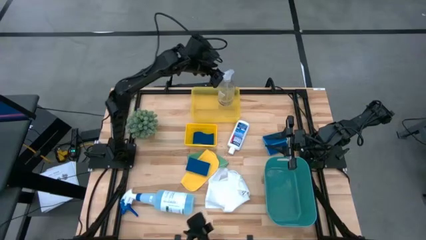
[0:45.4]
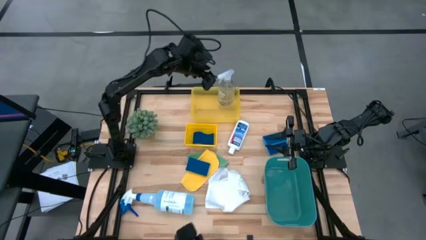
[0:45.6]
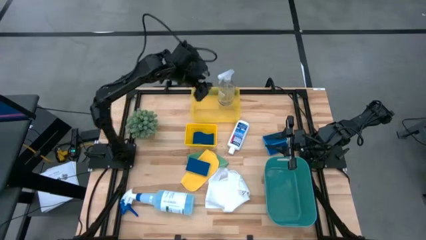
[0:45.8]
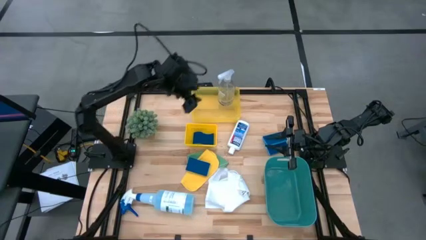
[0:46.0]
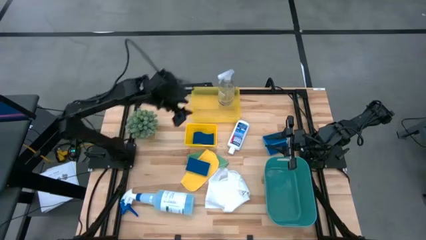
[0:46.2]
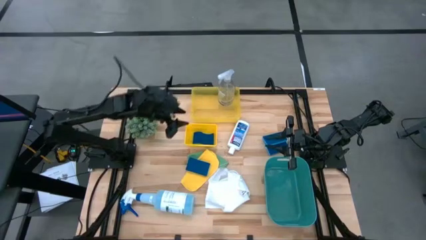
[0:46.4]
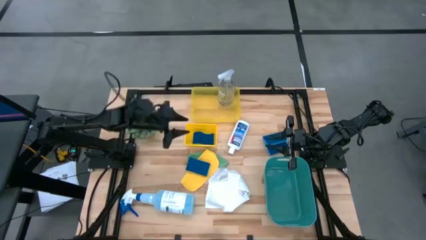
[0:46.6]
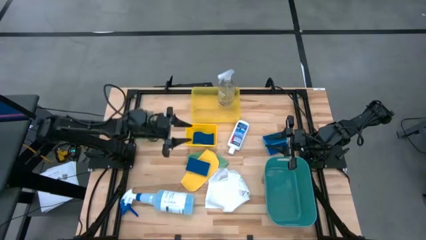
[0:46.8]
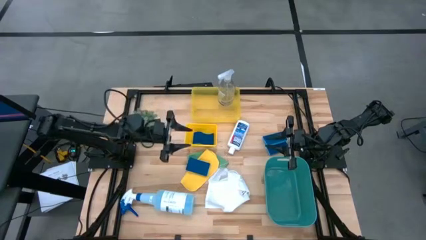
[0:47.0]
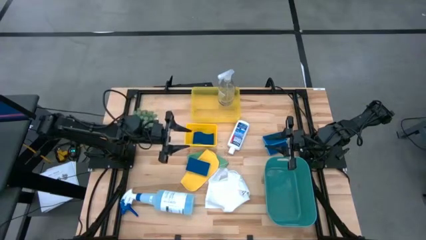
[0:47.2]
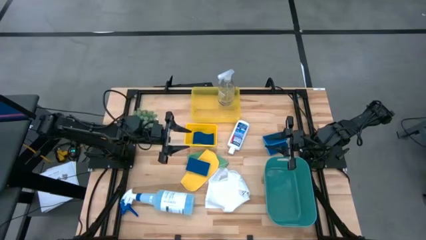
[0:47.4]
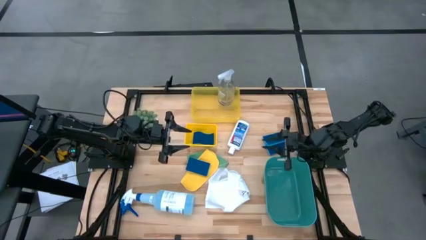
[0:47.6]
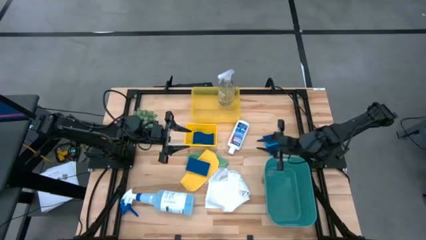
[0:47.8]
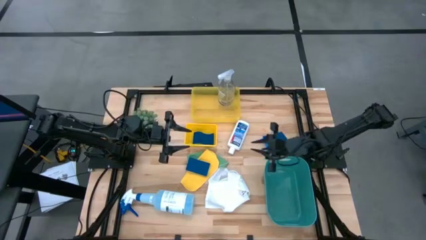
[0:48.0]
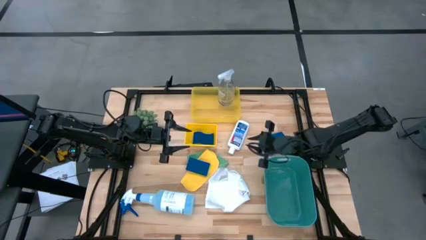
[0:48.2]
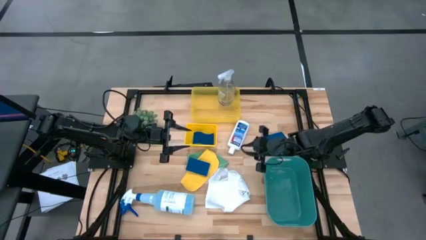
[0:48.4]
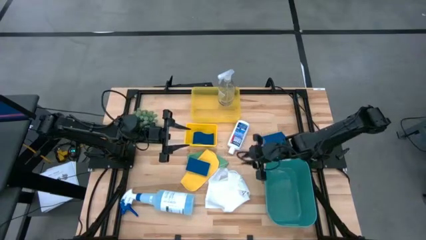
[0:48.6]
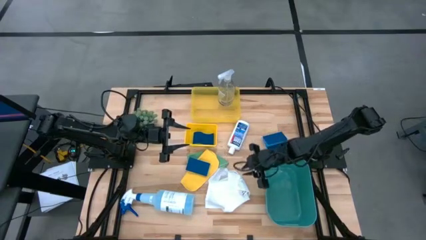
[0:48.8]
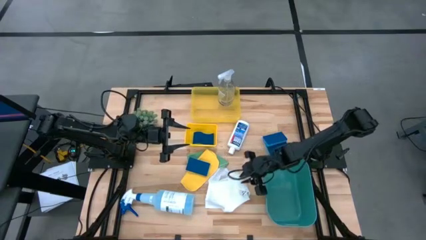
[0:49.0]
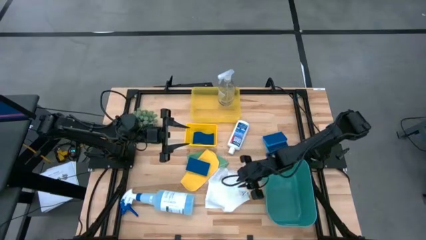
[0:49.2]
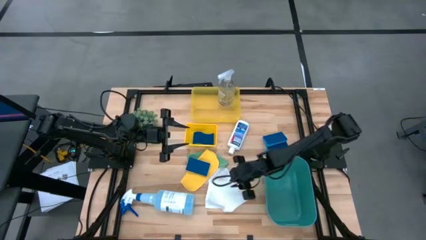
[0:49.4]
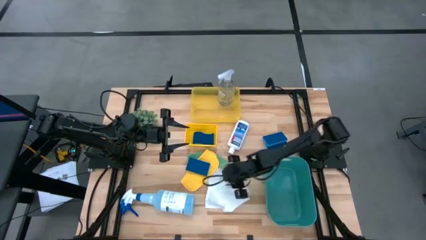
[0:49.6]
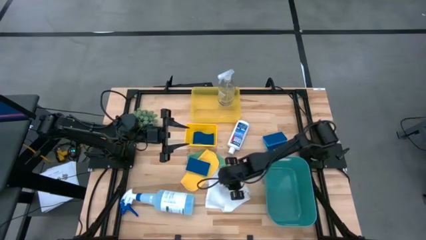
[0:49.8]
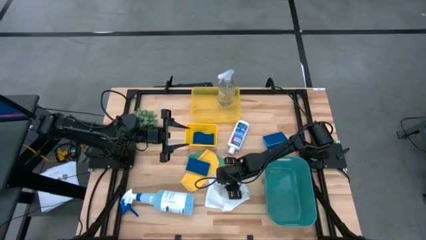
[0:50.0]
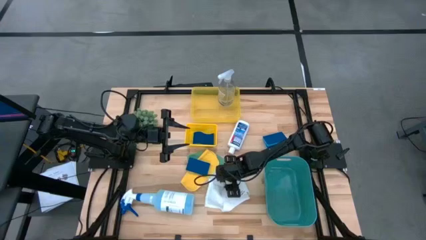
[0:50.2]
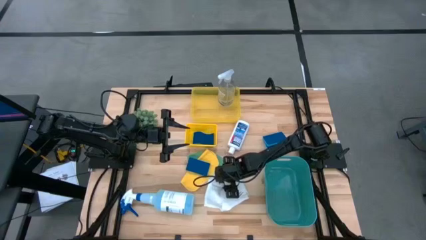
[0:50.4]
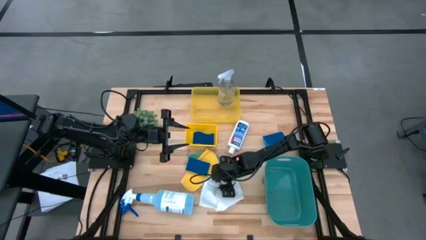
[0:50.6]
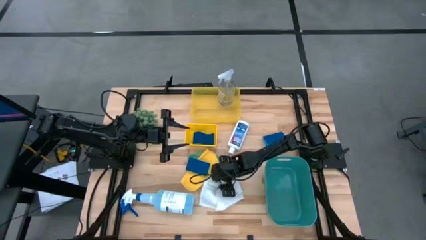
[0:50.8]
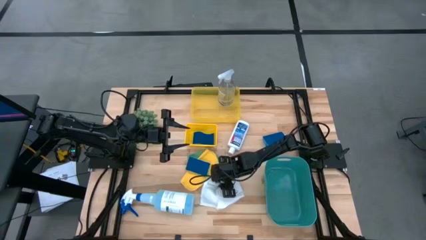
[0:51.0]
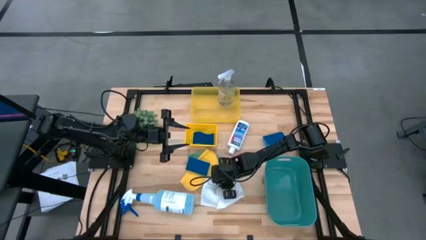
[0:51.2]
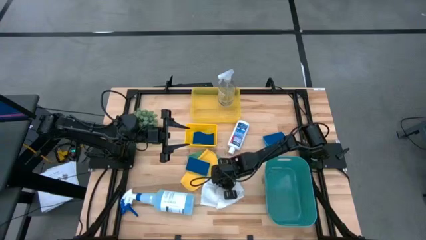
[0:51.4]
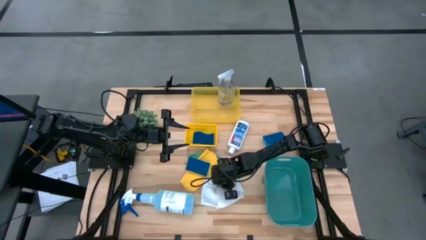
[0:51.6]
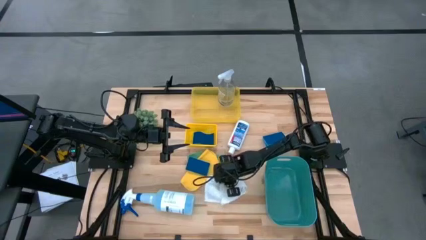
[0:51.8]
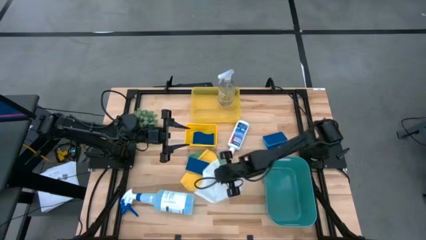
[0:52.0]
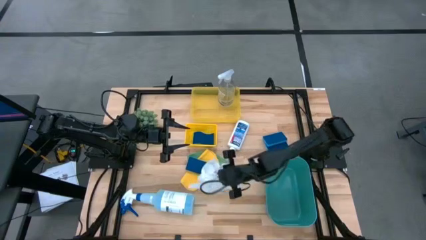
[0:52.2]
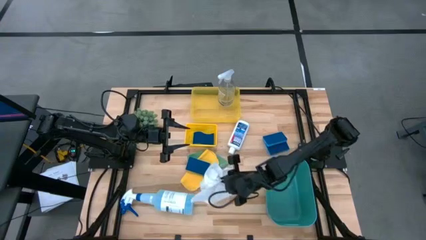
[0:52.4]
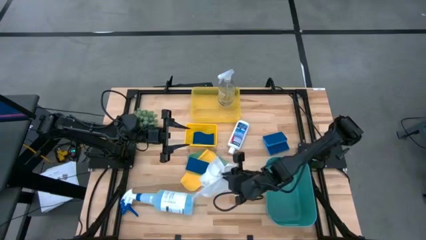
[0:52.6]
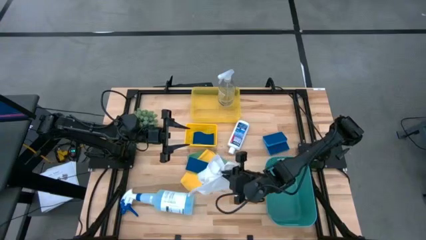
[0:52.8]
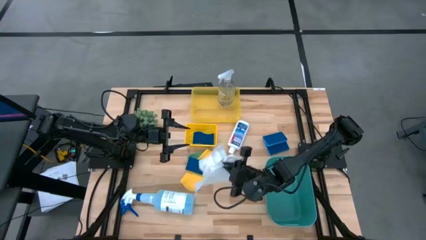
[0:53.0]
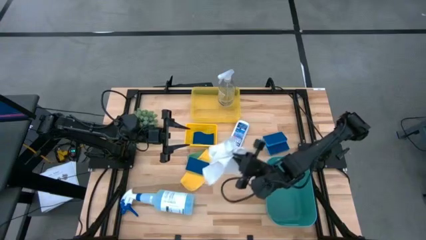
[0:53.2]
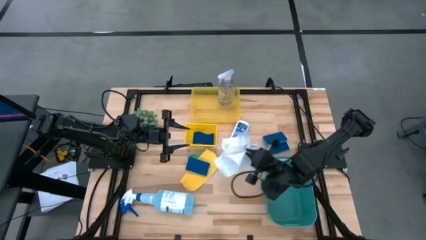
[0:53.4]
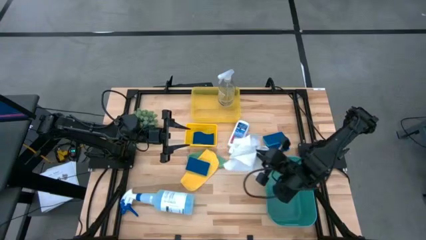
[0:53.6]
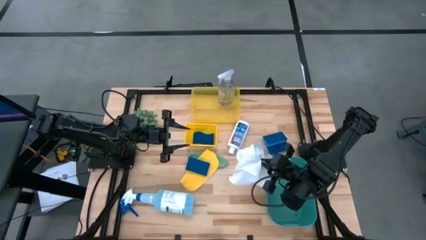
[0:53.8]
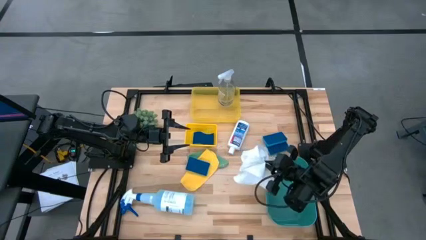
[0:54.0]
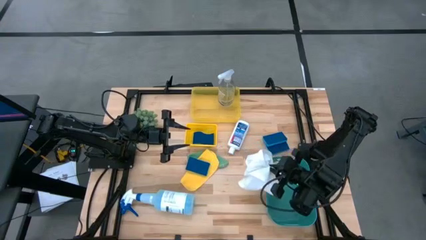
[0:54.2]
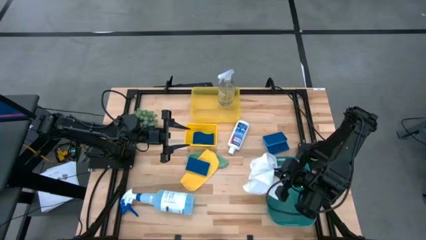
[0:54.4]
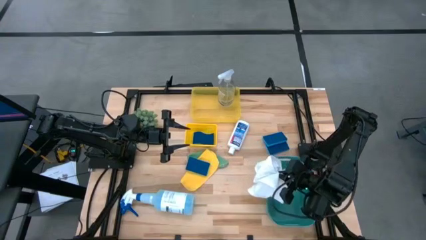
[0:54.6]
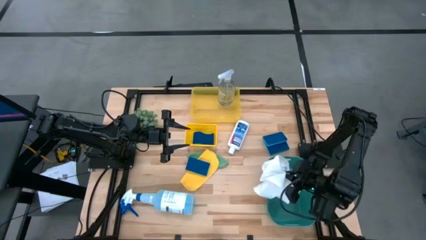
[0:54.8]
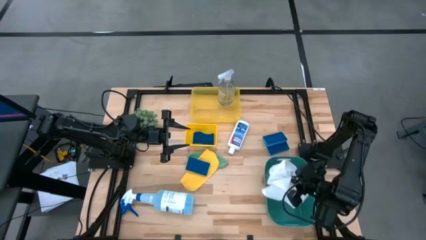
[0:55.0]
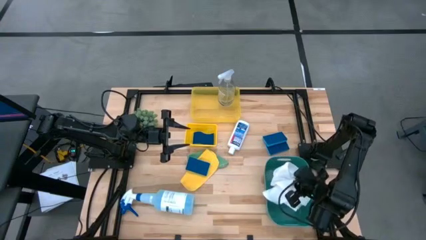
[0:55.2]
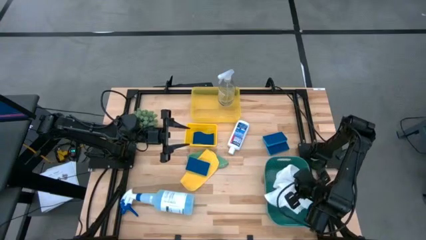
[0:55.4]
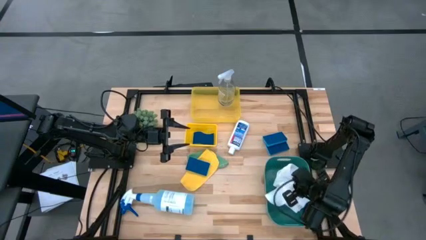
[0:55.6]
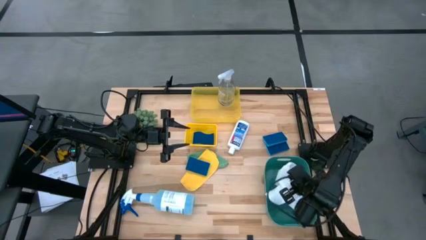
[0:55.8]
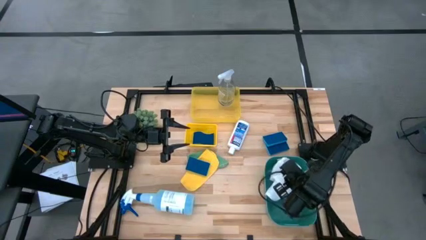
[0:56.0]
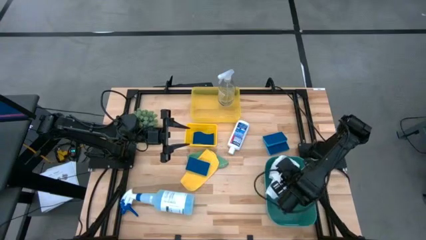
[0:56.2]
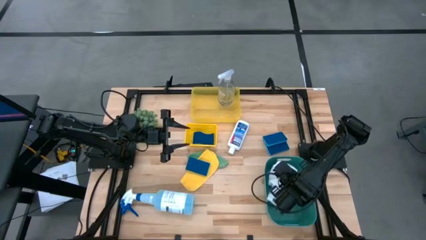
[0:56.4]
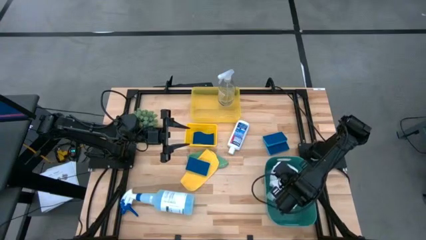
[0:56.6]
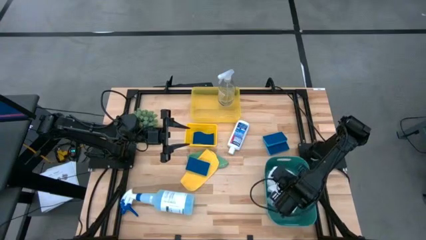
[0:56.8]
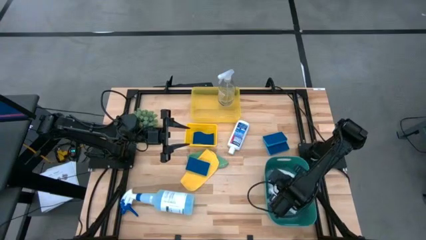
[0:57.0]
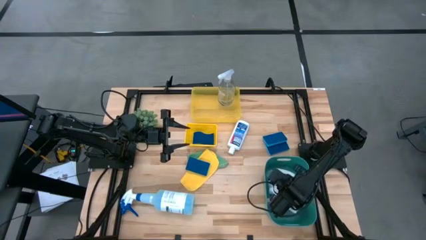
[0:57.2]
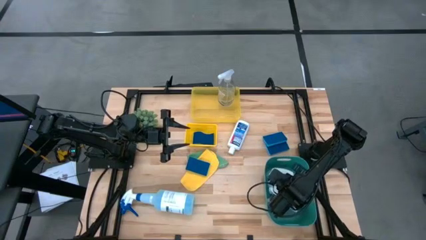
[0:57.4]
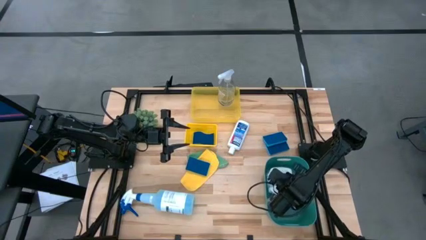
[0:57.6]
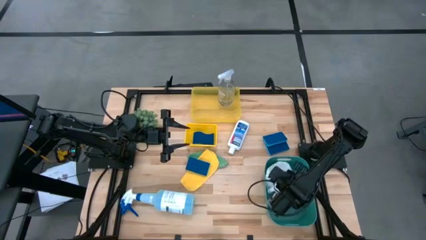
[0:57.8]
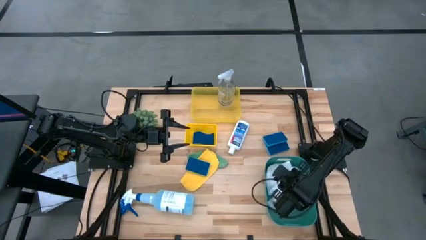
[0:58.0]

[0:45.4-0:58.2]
Task: Pick & Place Kitchen Items
Put the white cloth into the green bin
